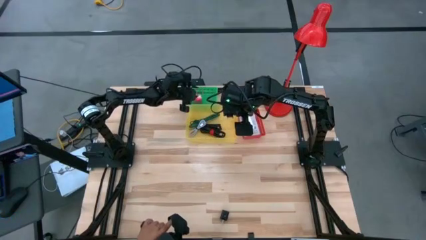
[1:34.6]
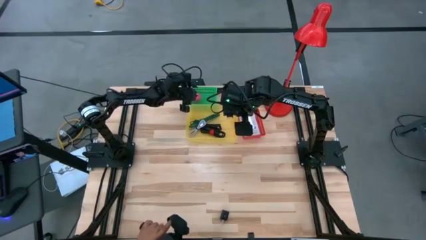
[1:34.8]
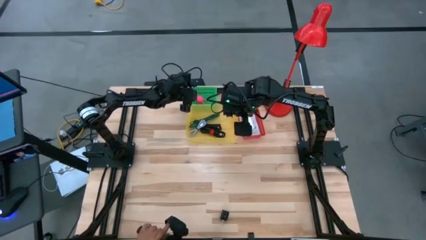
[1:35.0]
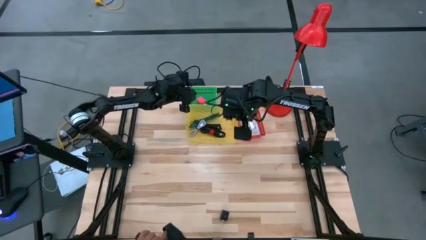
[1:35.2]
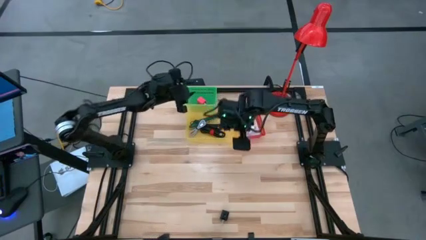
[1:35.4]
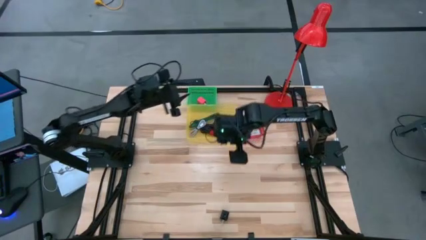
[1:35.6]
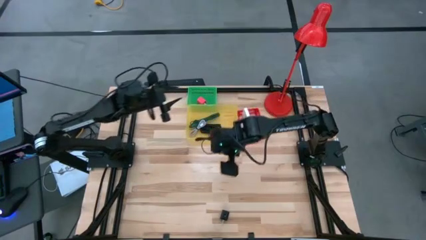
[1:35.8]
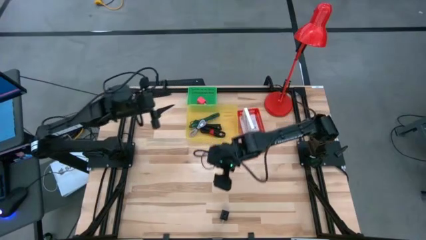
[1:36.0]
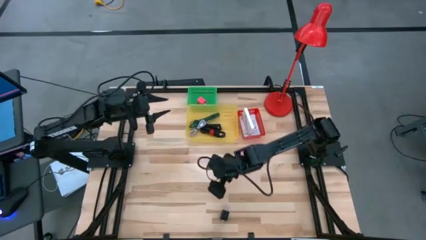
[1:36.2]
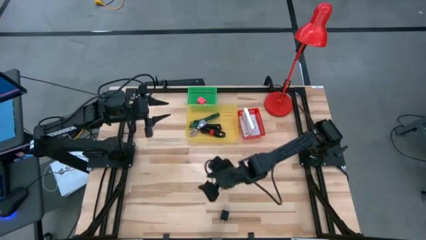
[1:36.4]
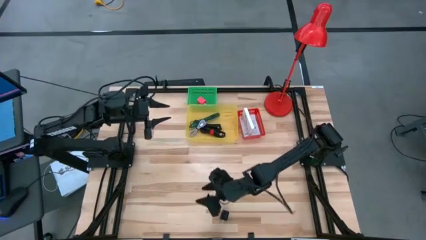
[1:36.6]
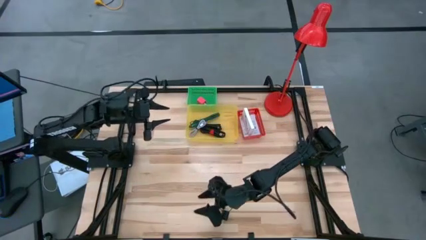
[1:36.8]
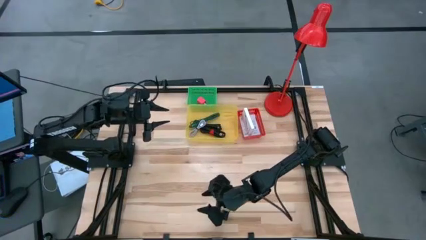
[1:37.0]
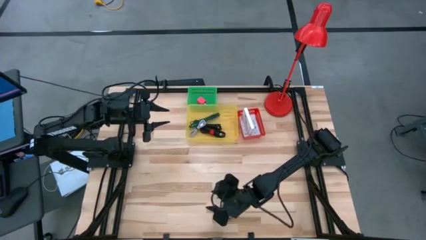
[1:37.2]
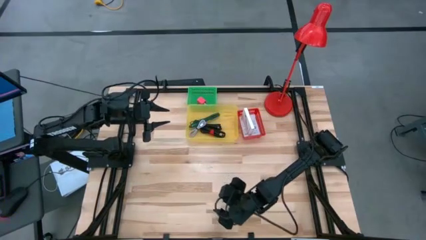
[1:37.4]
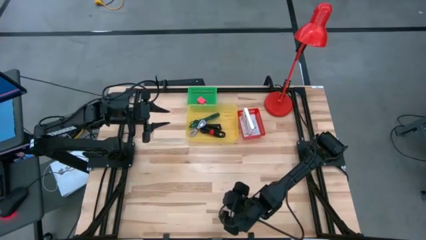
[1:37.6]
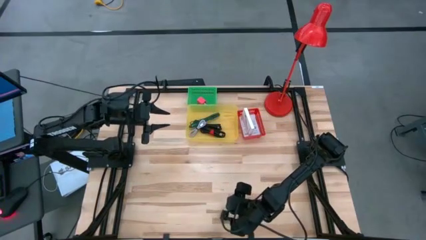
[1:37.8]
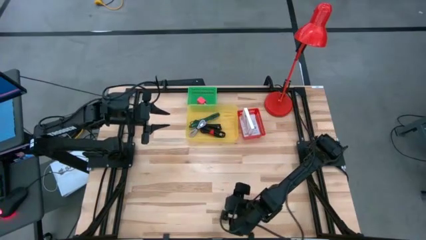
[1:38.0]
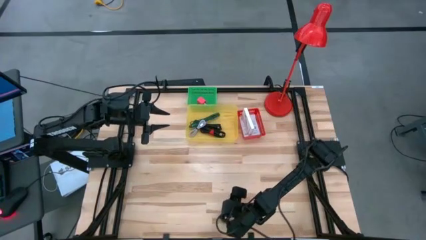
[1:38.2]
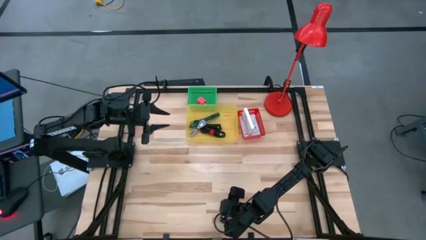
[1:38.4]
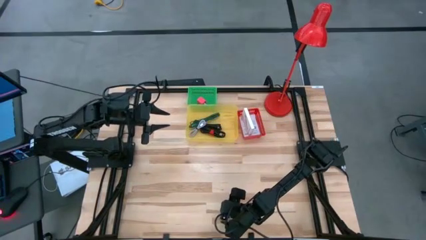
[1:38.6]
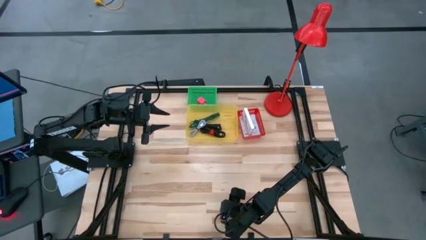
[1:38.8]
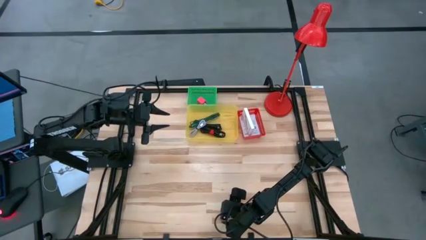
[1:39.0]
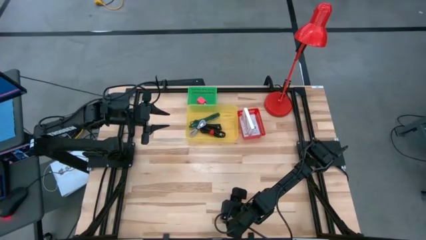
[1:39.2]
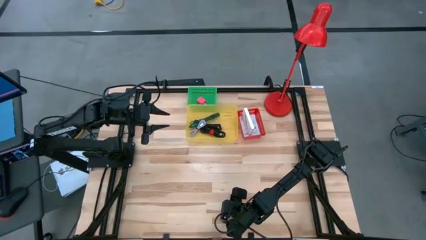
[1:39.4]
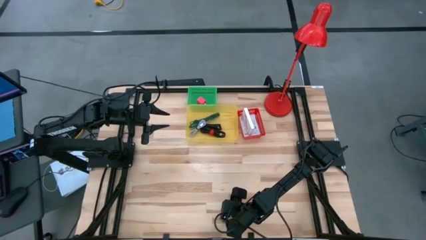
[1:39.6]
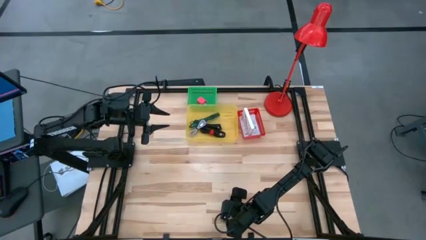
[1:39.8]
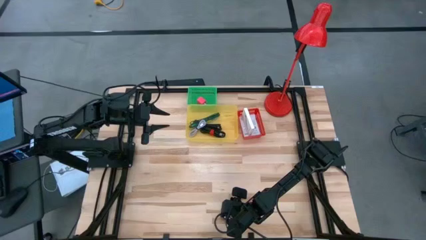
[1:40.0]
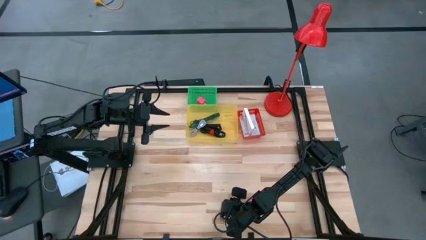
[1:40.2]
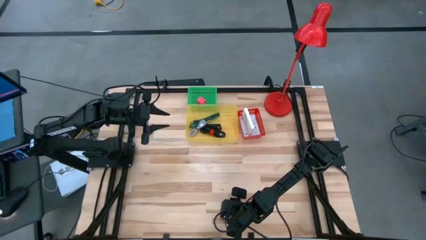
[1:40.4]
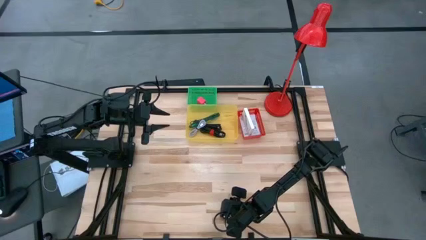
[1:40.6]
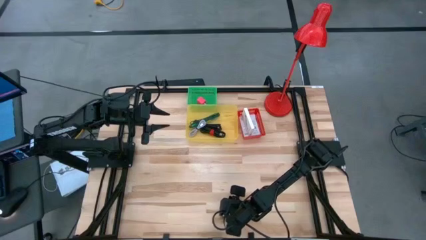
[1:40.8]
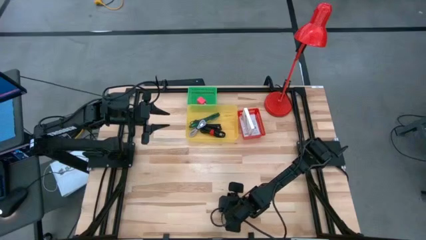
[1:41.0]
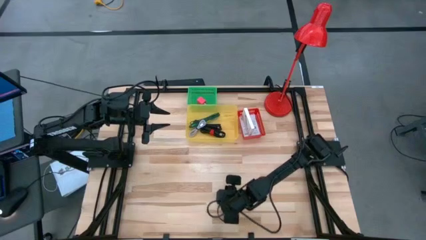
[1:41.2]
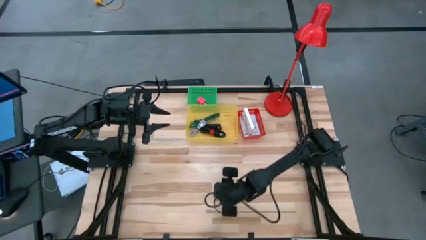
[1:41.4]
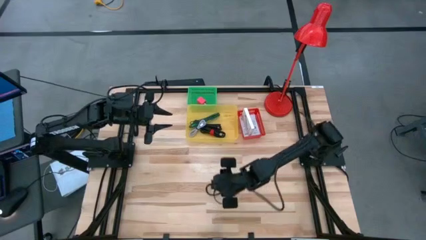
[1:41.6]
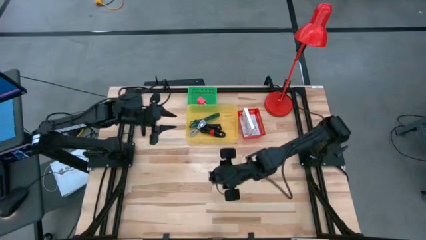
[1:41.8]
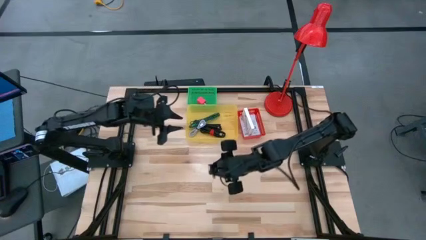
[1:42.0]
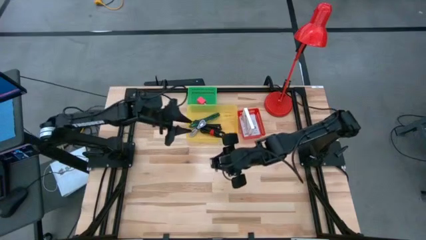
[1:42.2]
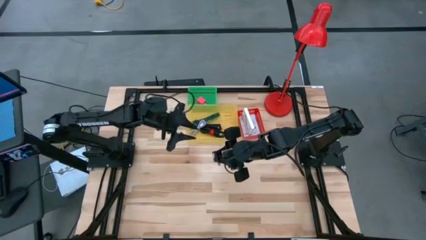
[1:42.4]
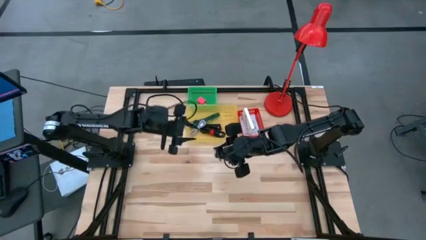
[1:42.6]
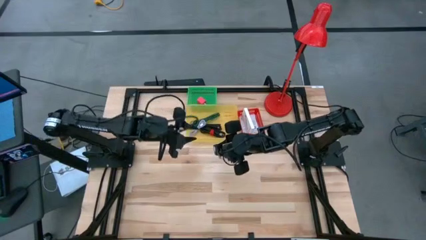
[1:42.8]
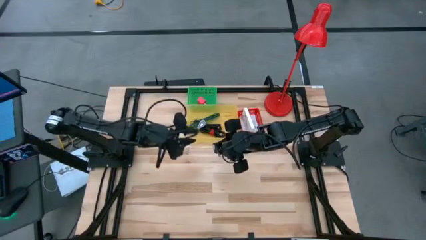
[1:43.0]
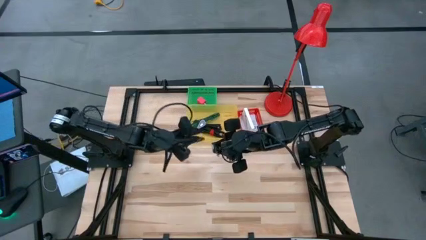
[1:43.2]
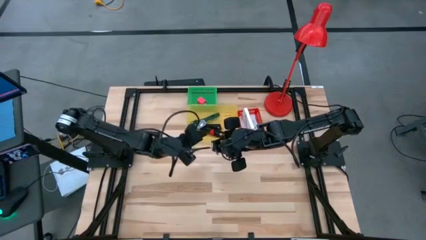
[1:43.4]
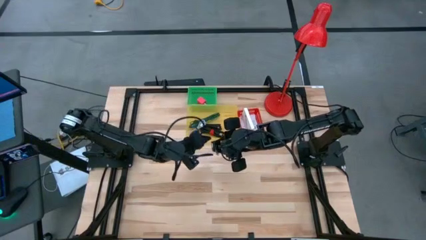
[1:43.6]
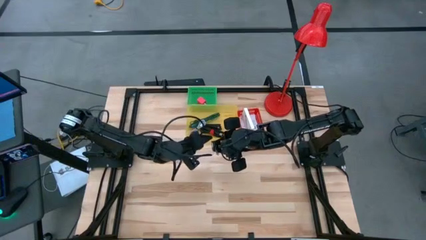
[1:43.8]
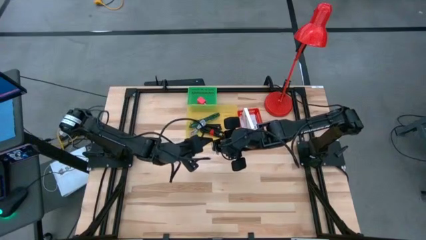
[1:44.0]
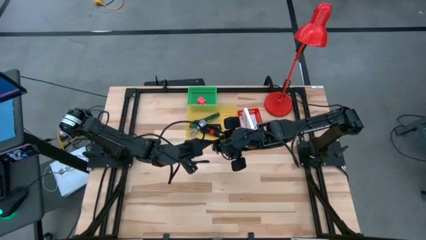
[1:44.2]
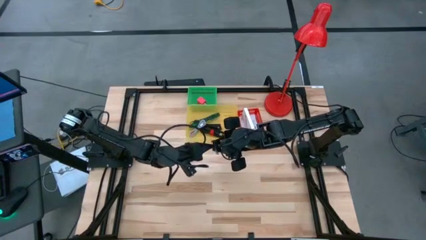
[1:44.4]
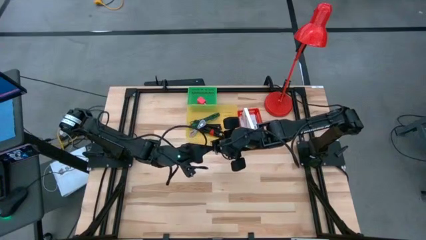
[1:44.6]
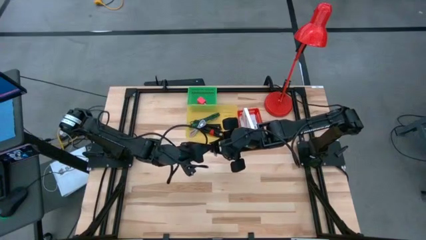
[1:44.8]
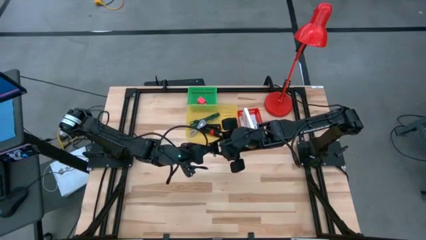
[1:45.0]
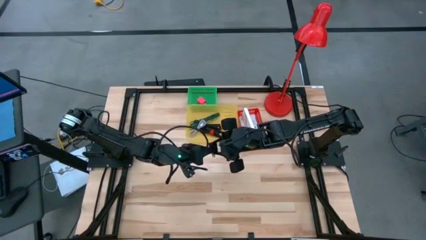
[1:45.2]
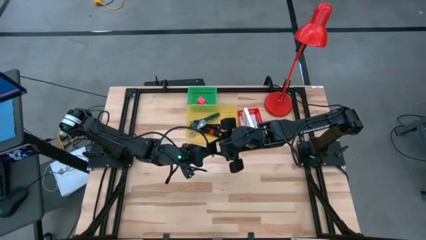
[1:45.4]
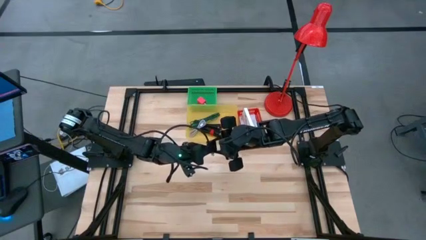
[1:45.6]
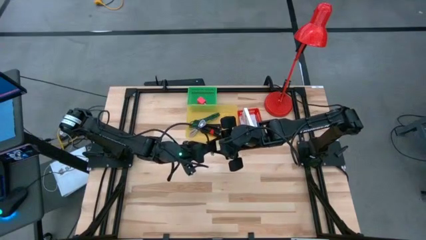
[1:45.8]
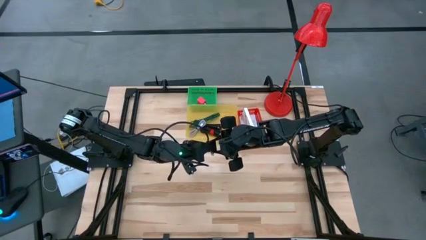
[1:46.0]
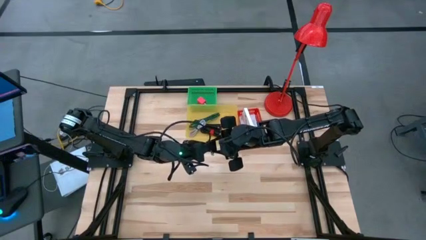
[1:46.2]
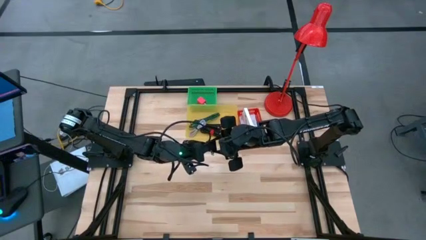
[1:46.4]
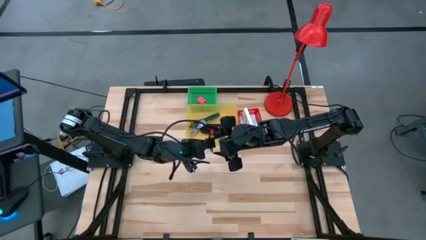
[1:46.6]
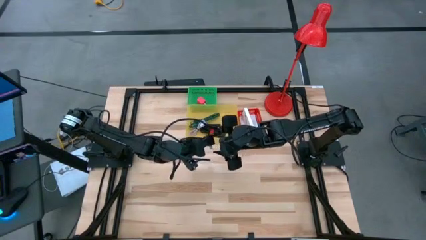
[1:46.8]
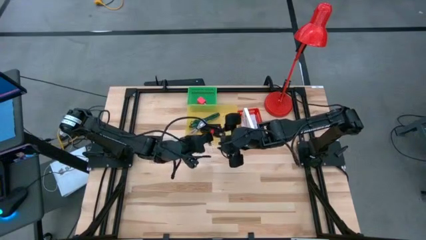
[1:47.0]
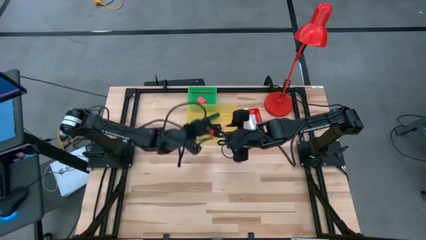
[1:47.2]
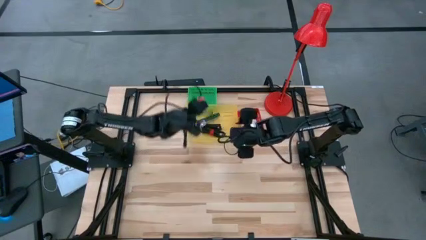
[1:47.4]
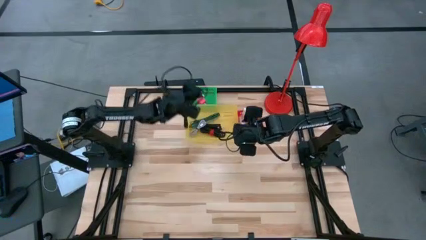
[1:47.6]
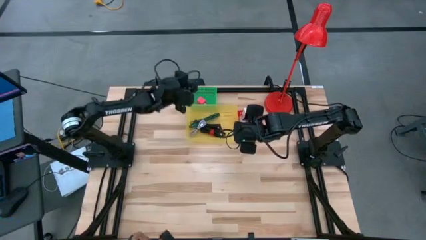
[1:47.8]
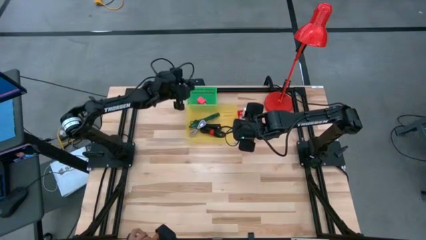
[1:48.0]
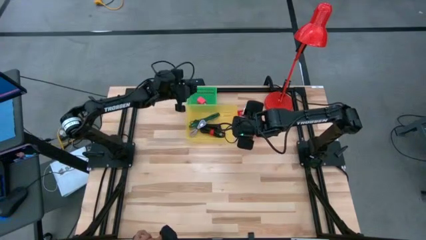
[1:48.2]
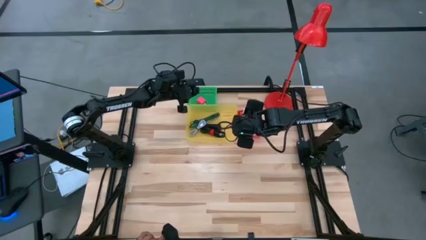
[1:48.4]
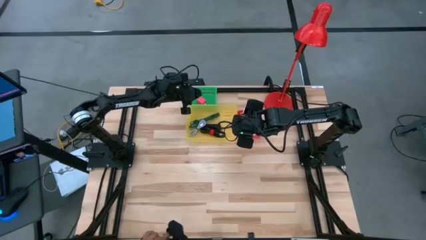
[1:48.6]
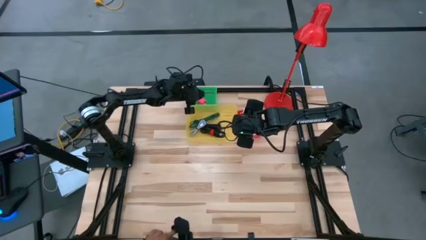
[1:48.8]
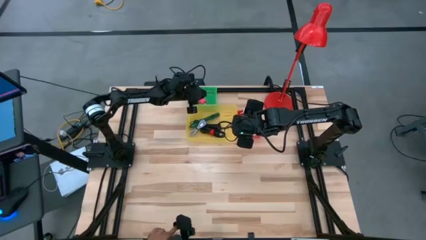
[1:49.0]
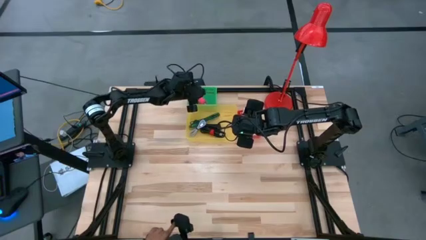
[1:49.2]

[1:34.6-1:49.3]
Task: Pick and place items into bin
Put the black charger adapter into the green bin

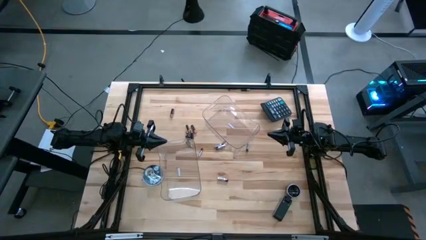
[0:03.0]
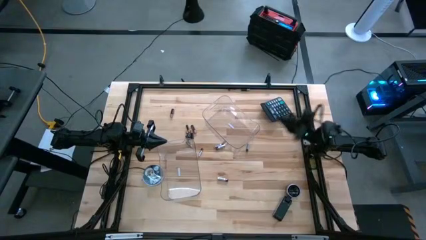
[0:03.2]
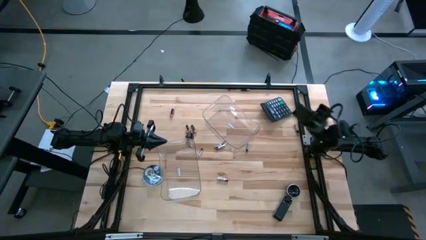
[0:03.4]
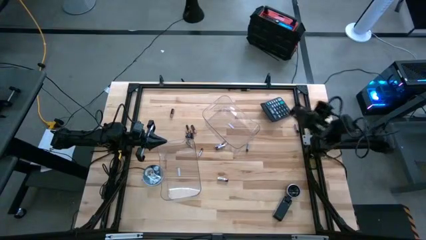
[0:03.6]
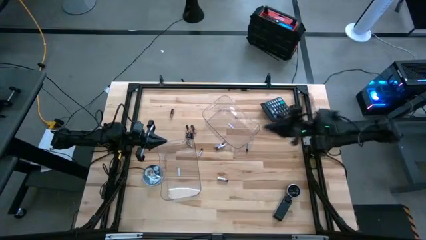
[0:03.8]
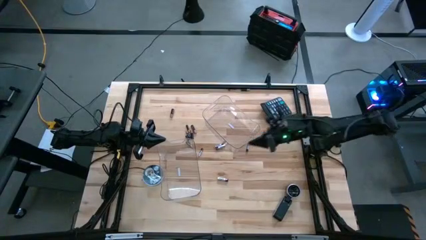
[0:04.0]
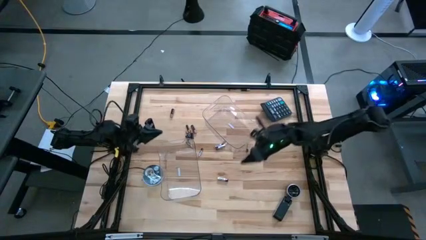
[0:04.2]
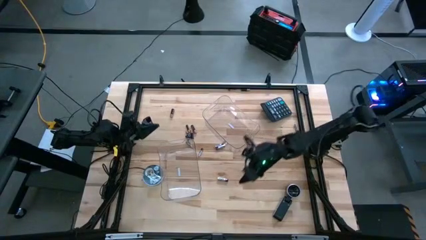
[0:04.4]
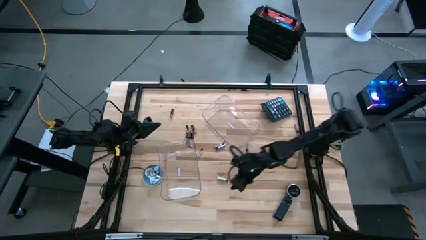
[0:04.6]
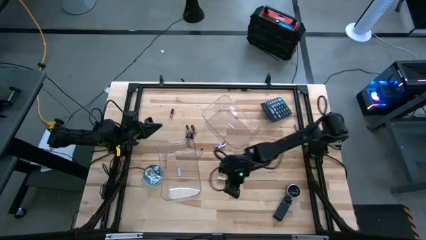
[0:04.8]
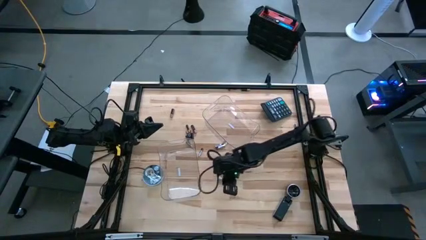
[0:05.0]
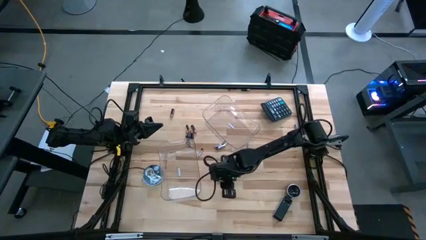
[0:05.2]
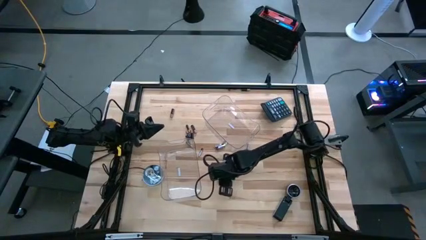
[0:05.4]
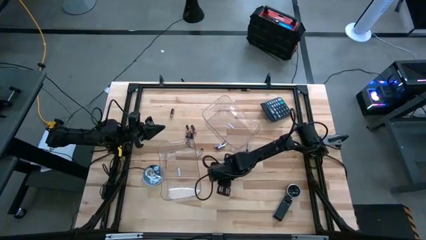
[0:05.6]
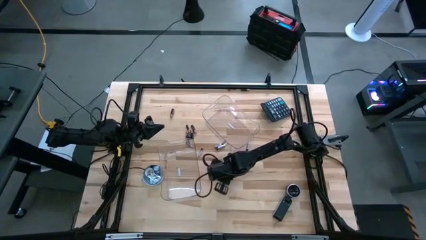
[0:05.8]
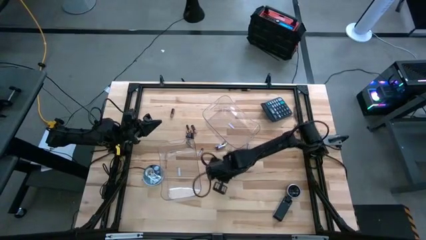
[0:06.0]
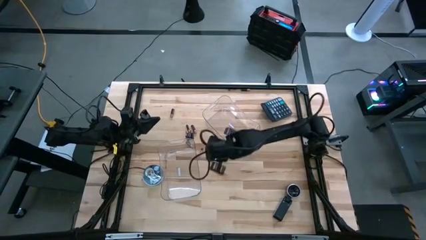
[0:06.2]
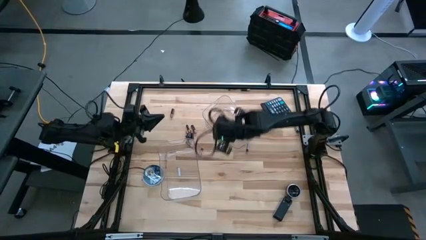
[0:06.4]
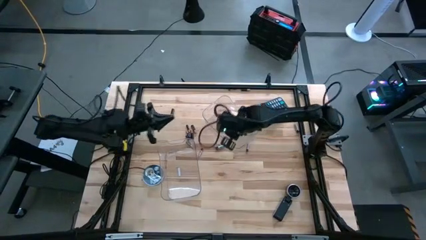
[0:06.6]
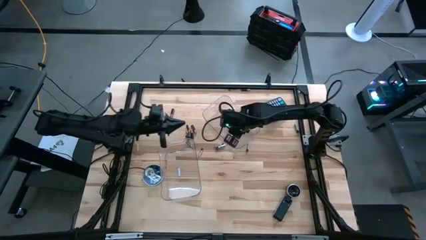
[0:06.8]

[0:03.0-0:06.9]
Task: Sort batteries
Put the silver battery into the top transparent bin
